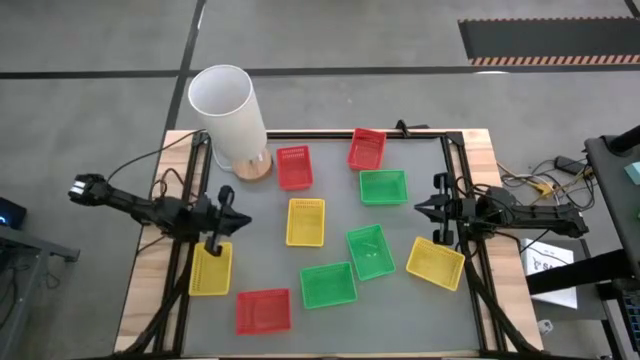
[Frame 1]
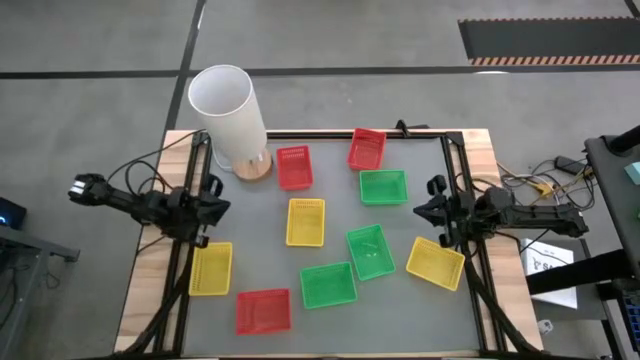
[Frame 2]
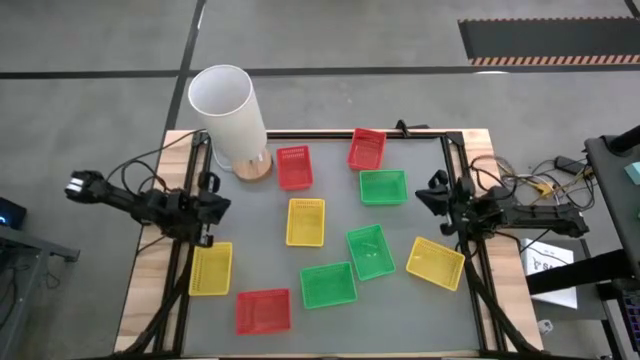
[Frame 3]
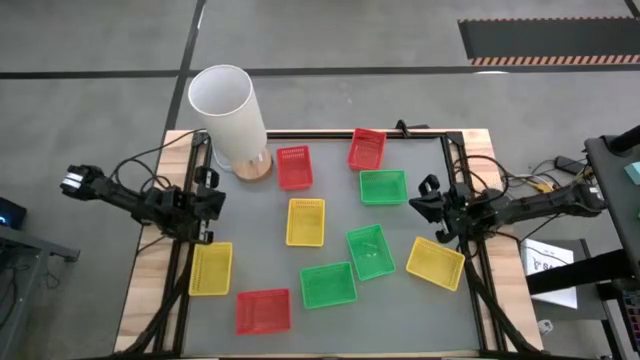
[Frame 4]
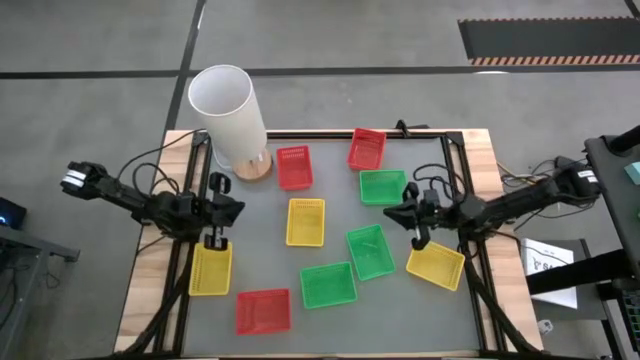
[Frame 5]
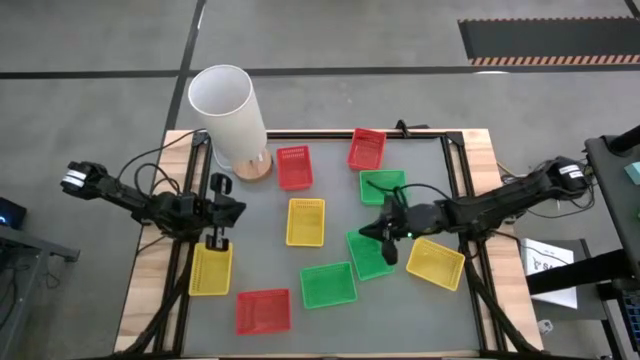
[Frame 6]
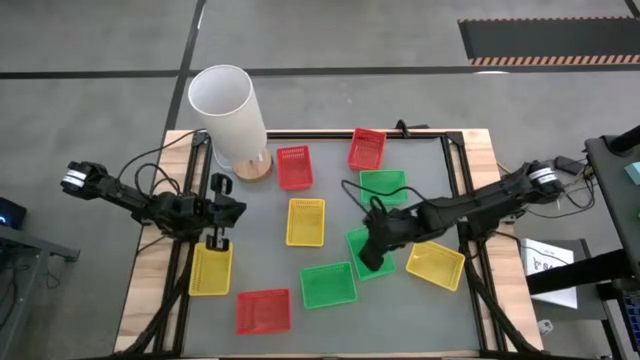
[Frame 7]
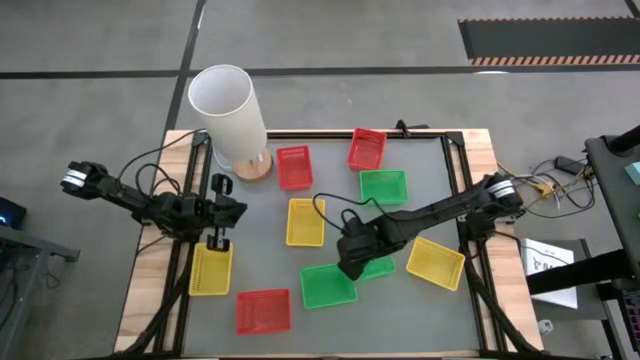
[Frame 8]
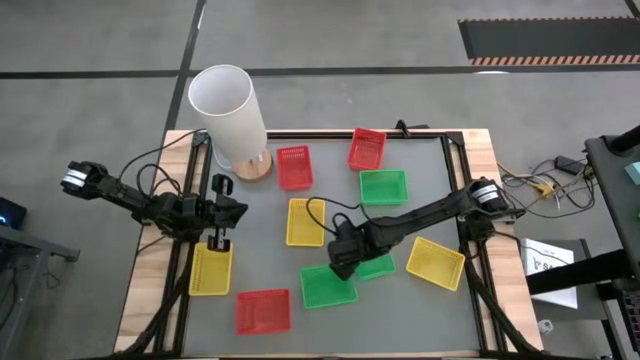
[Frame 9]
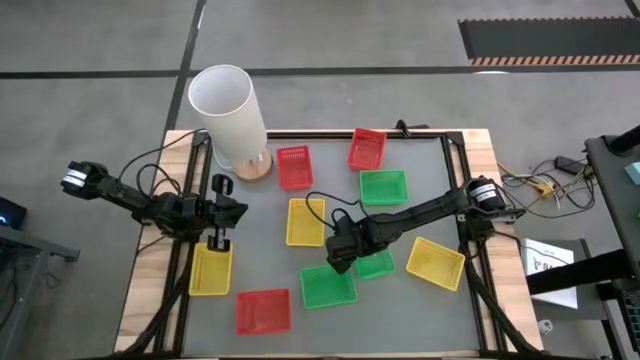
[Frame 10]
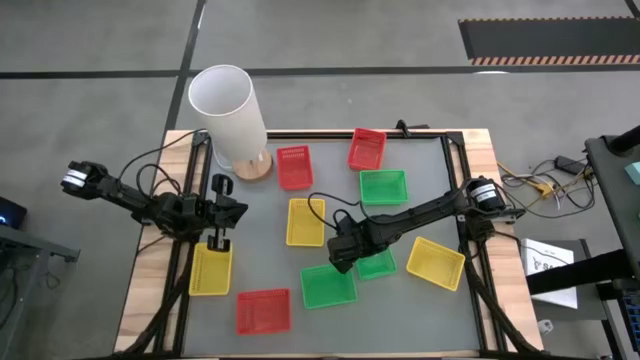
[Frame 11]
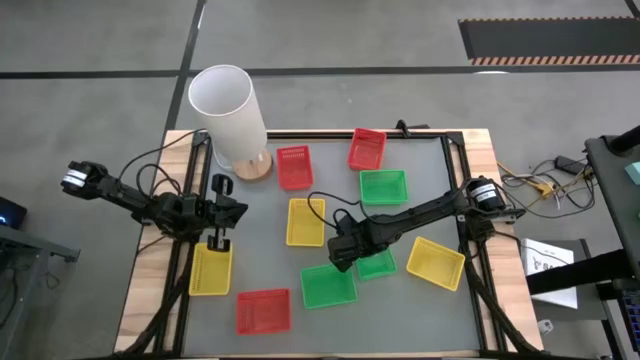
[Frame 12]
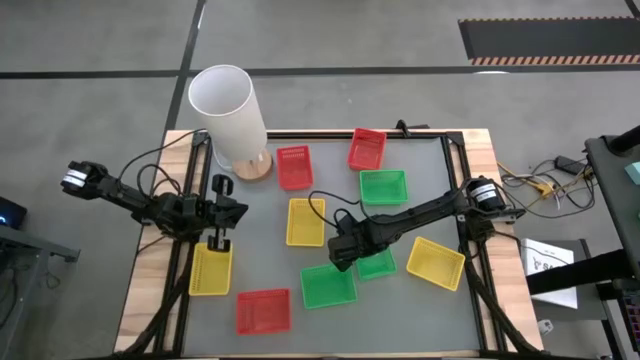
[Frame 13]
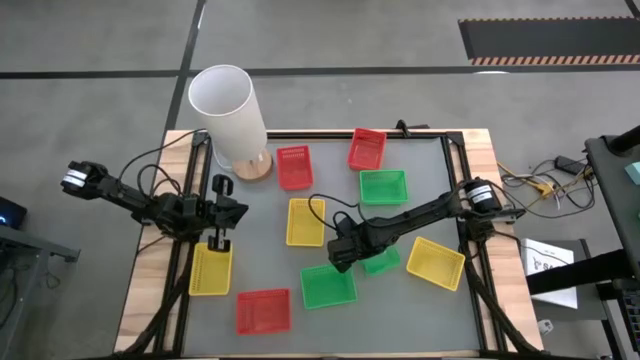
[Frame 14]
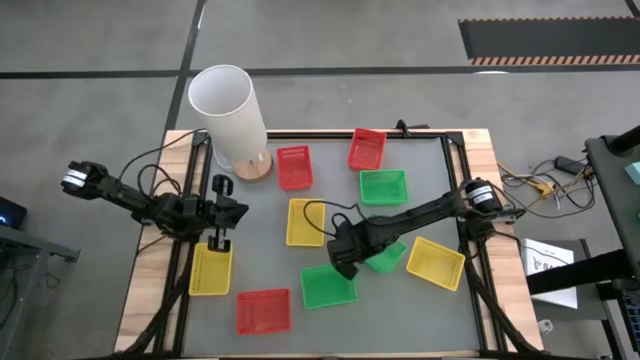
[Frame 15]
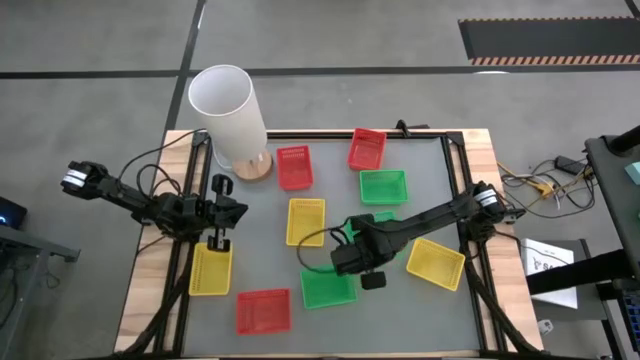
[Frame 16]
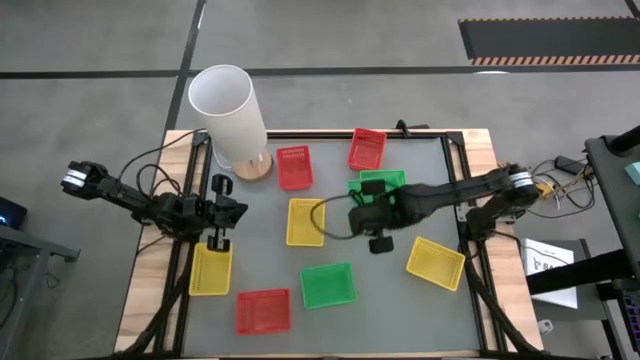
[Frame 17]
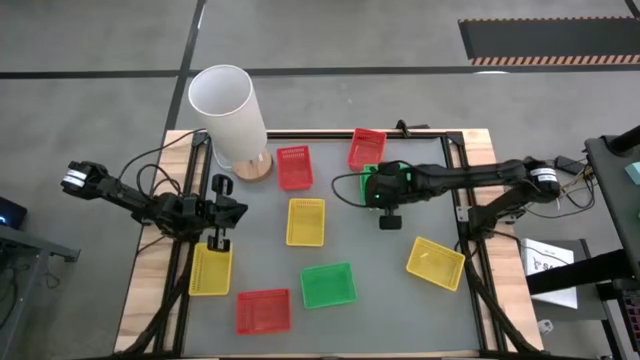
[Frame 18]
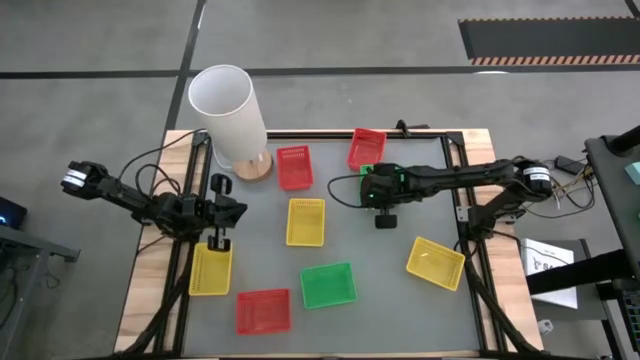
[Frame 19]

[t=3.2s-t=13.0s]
Stack the middle green basket on the top green basket

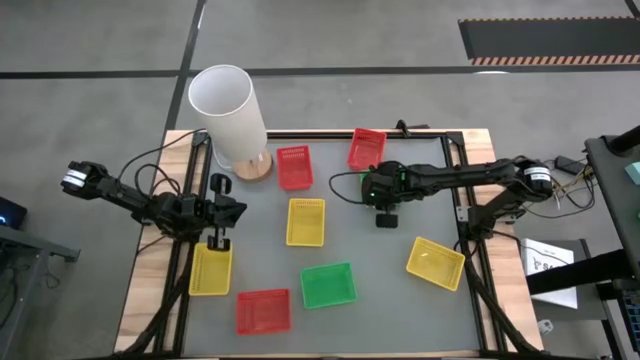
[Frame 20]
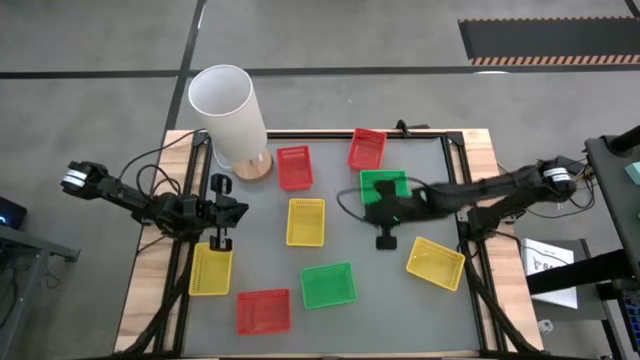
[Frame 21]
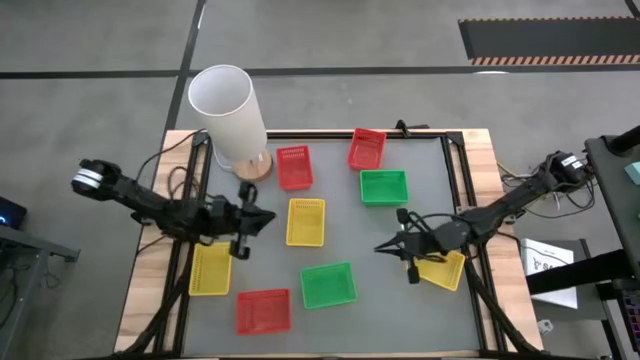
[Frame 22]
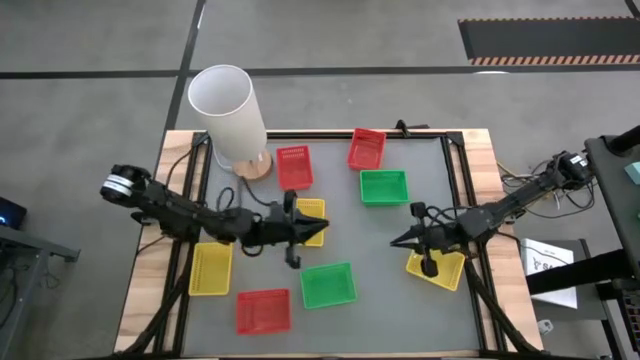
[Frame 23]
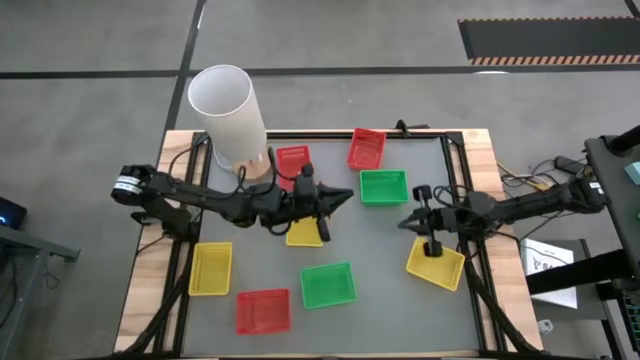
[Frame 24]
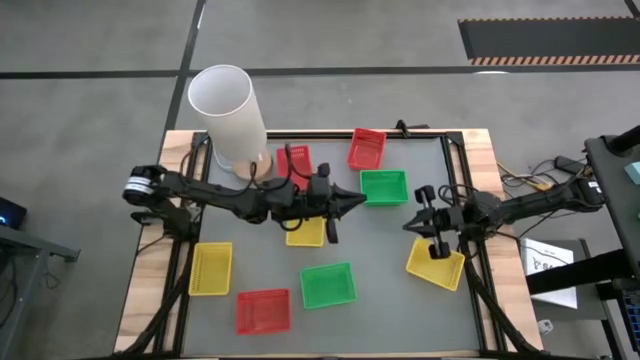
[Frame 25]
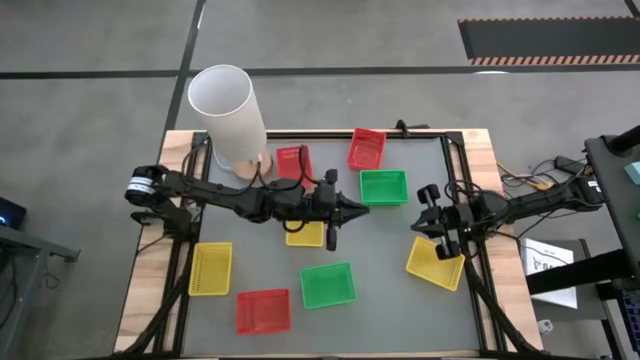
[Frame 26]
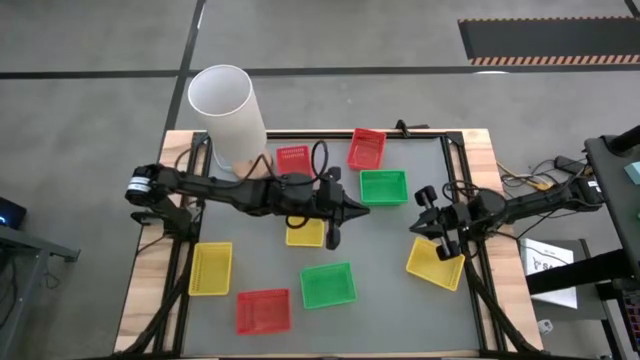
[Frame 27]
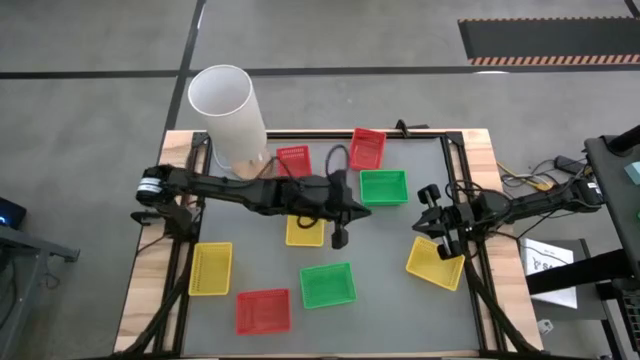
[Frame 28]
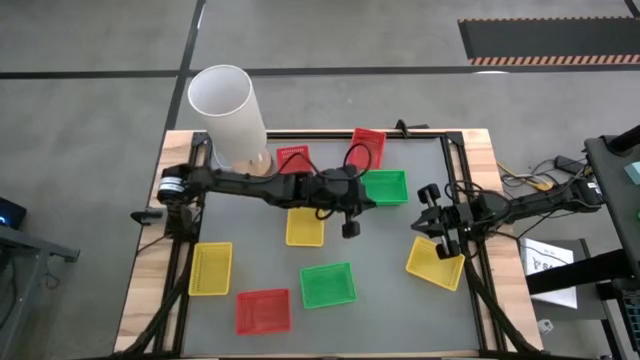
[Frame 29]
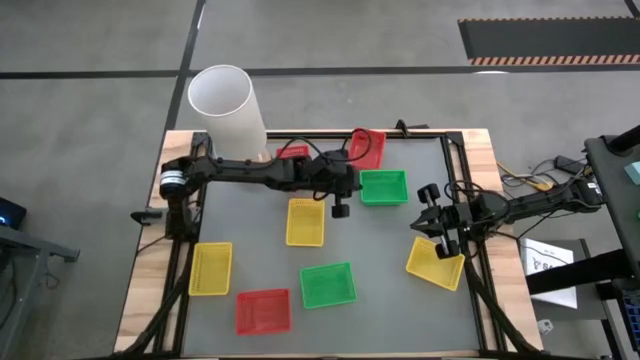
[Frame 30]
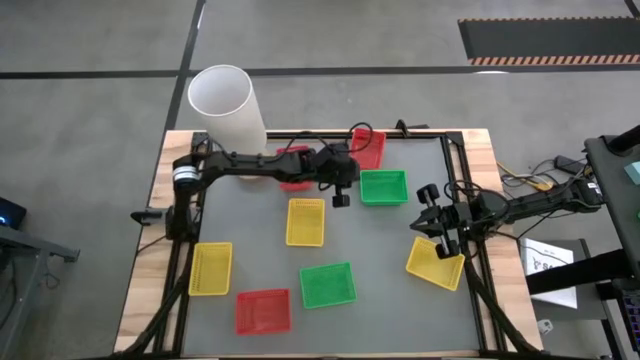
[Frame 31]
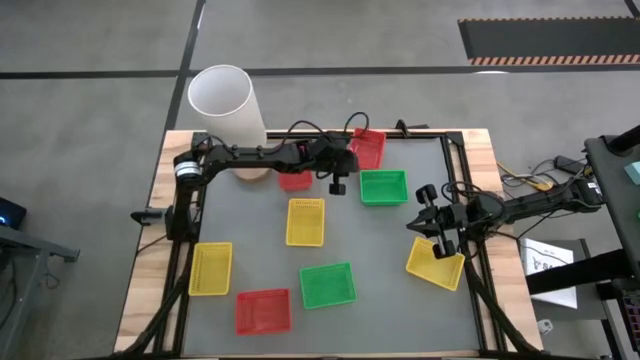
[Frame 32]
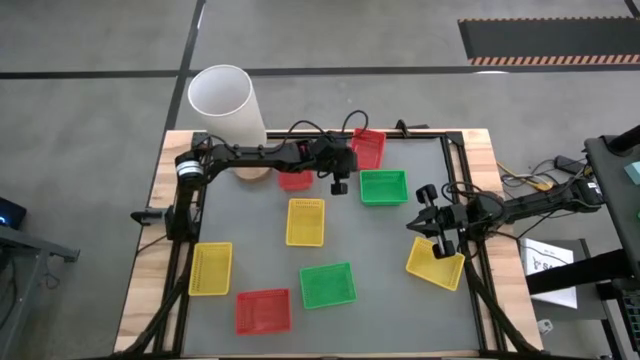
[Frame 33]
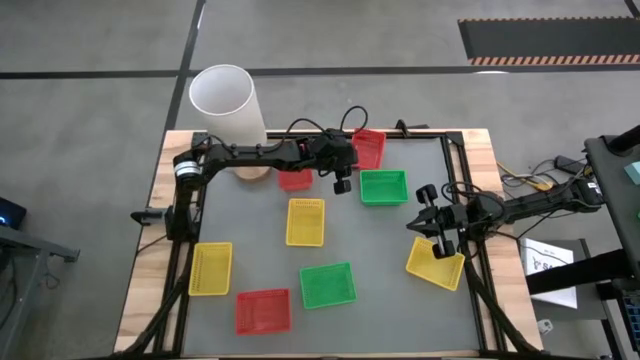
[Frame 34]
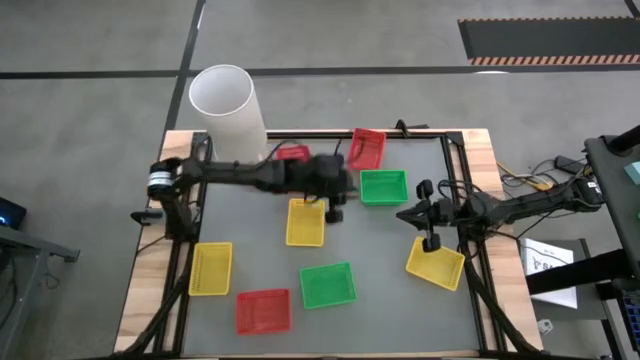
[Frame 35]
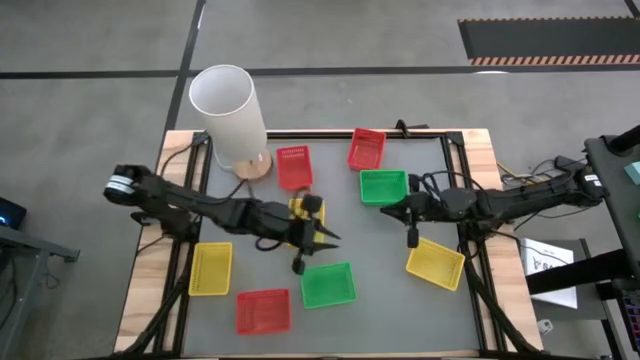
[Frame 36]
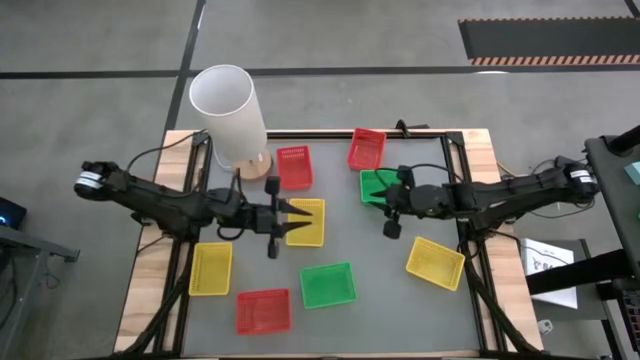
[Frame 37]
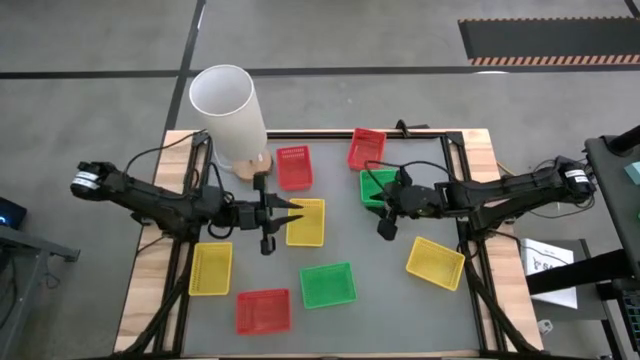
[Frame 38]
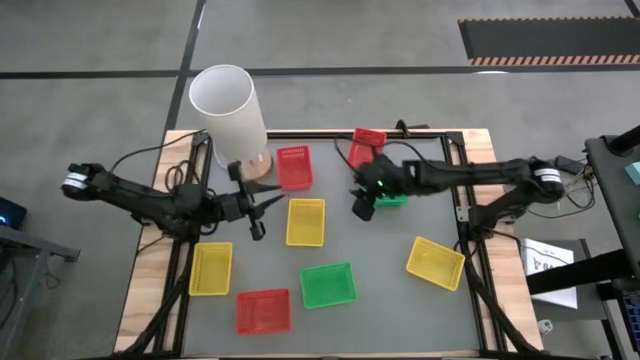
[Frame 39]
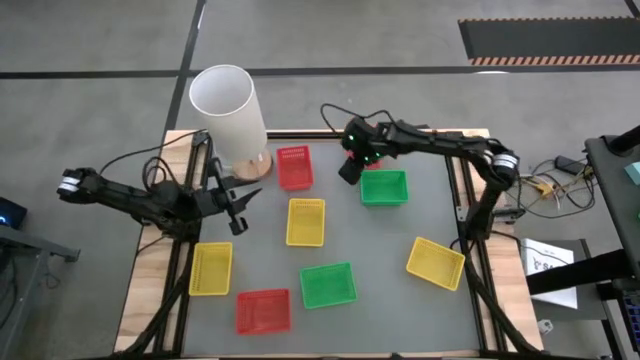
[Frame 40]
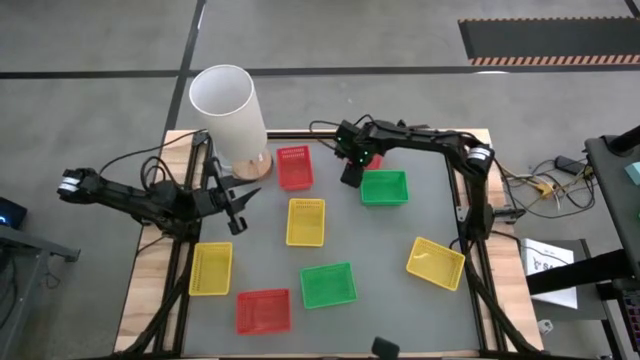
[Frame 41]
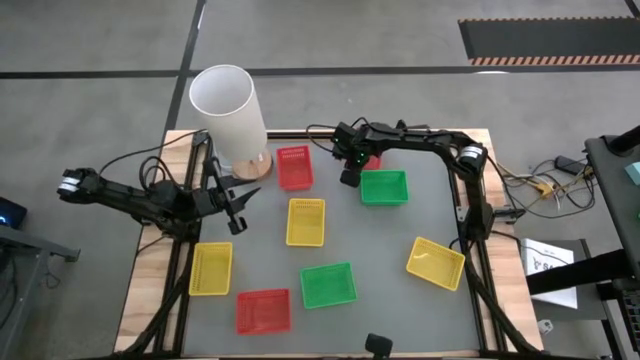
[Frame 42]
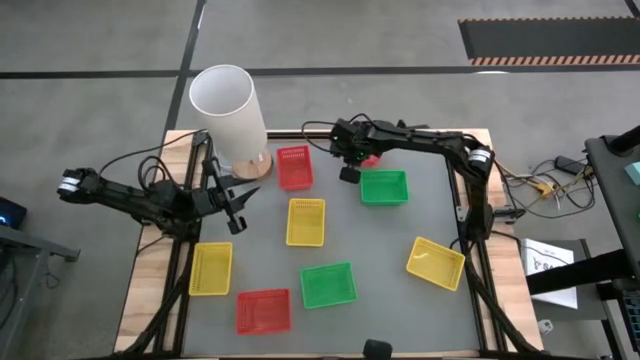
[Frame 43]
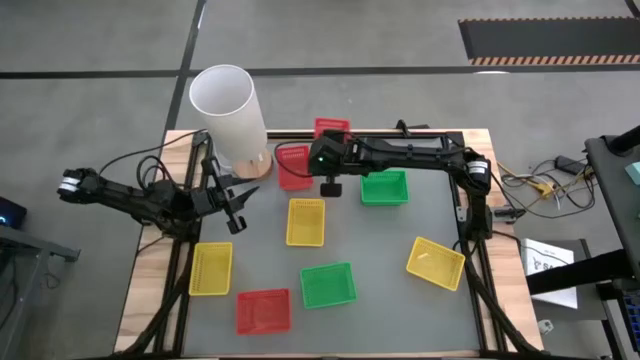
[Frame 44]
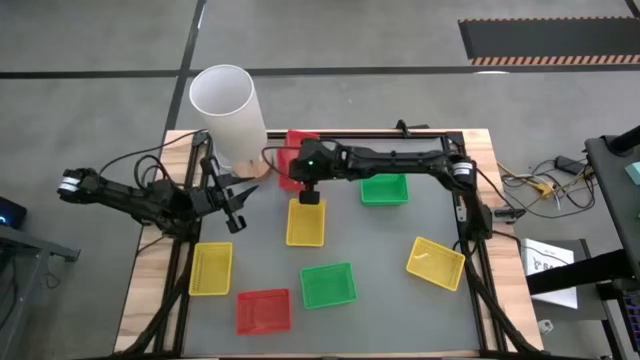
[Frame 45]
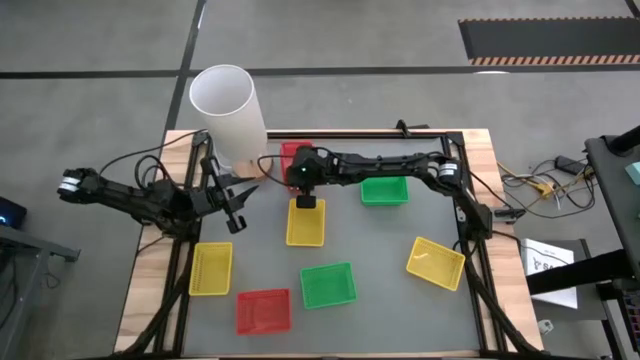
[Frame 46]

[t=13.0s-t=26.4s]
Stack the top right red basket on the top left red basket
